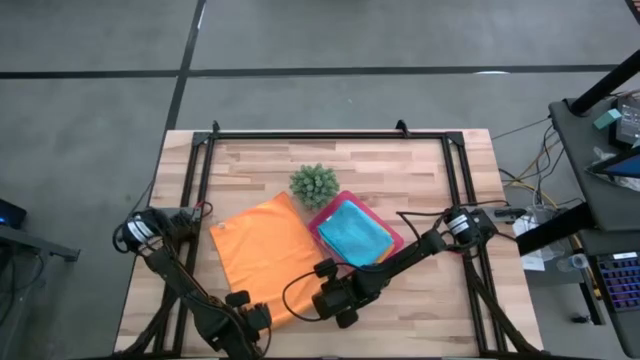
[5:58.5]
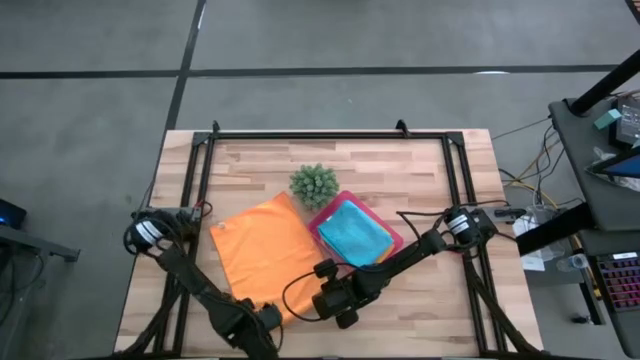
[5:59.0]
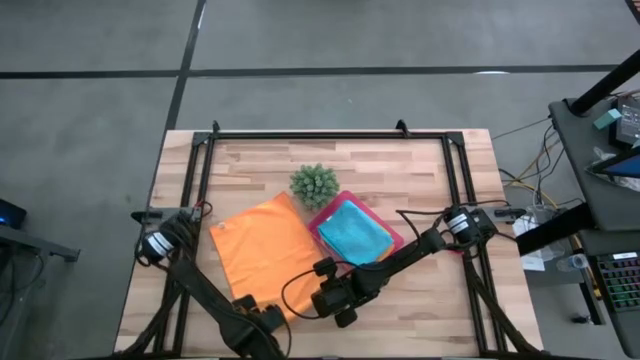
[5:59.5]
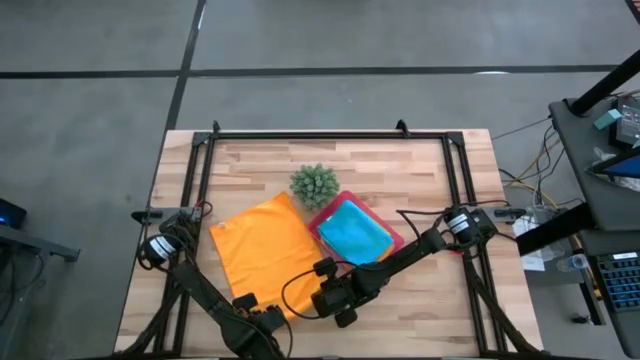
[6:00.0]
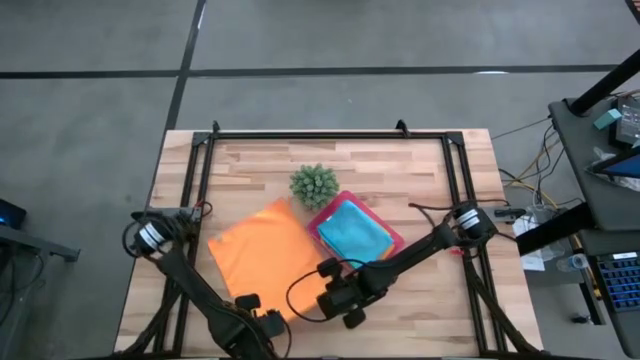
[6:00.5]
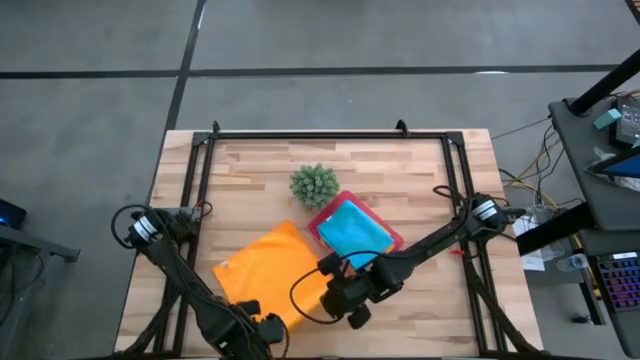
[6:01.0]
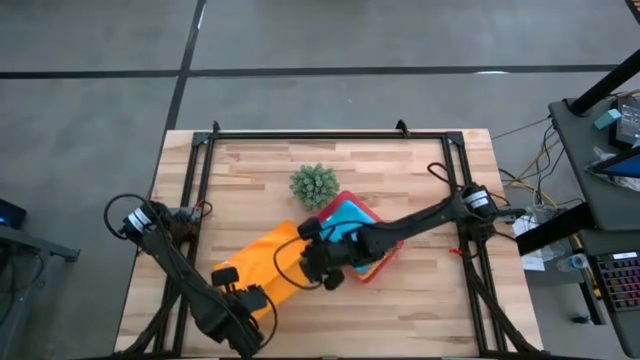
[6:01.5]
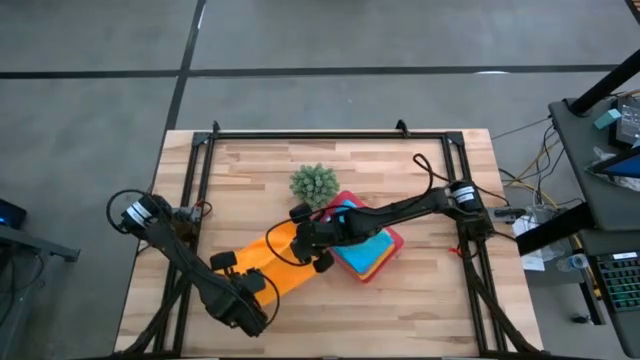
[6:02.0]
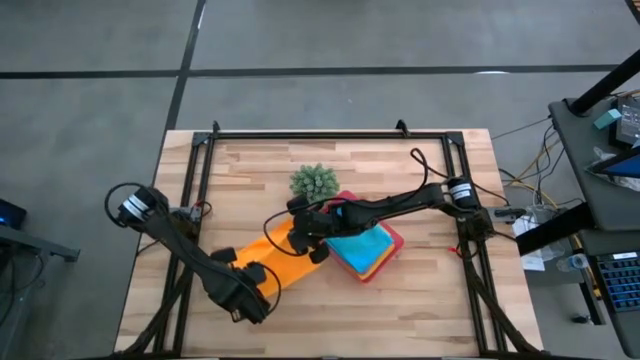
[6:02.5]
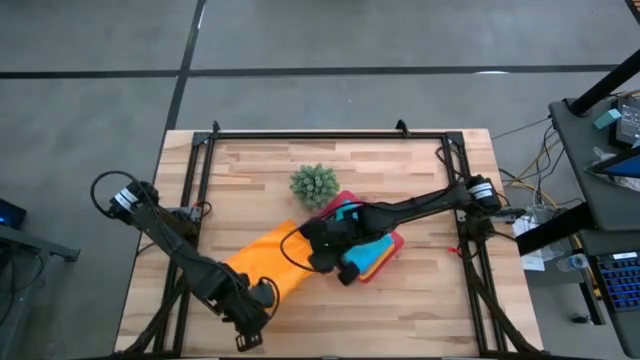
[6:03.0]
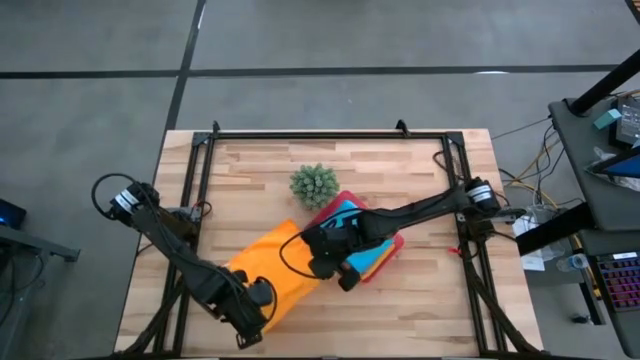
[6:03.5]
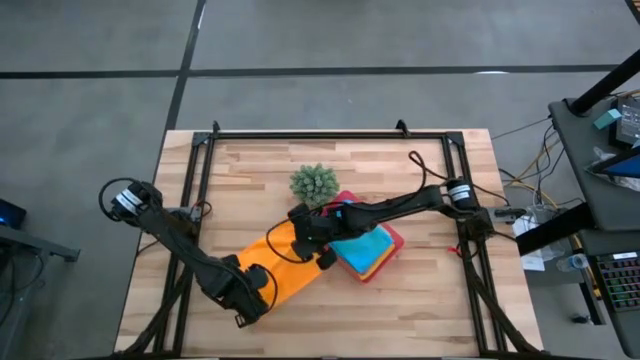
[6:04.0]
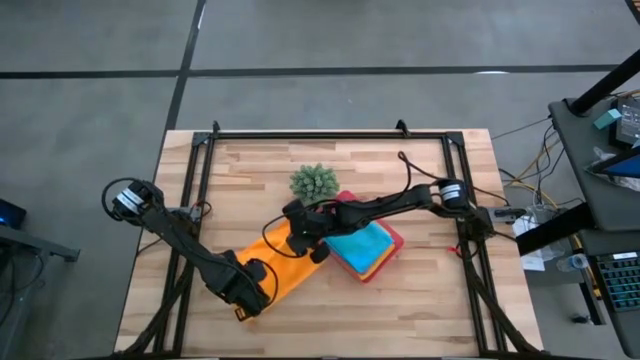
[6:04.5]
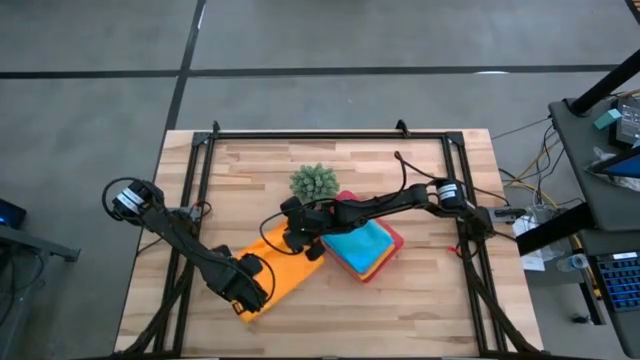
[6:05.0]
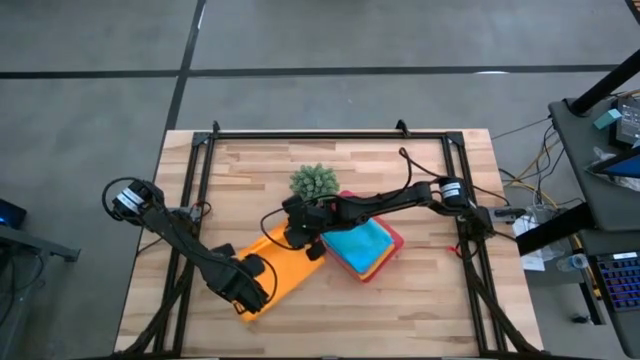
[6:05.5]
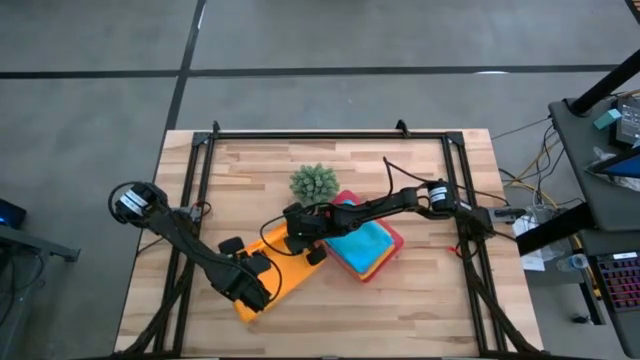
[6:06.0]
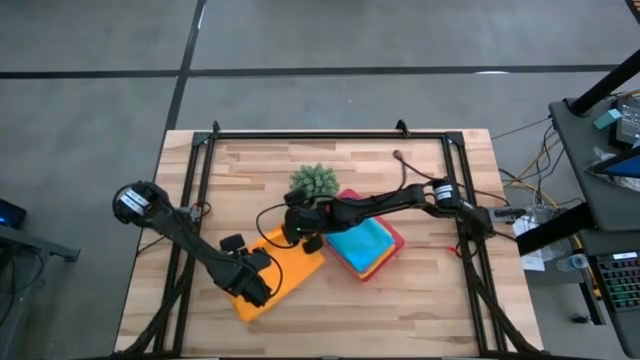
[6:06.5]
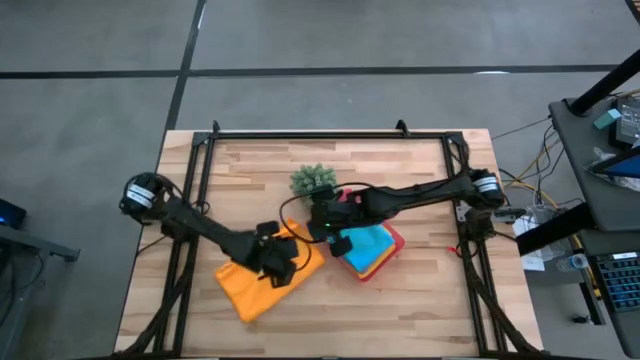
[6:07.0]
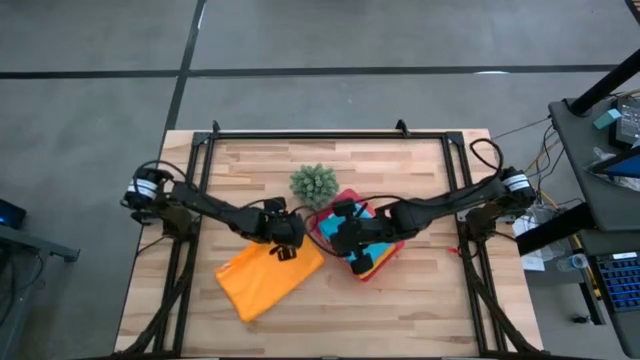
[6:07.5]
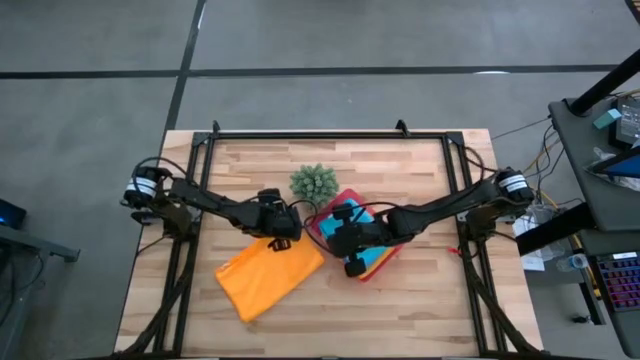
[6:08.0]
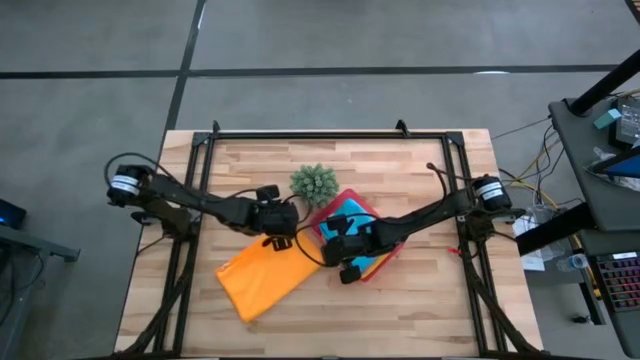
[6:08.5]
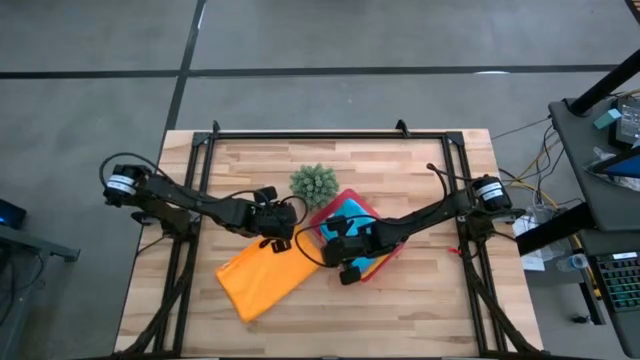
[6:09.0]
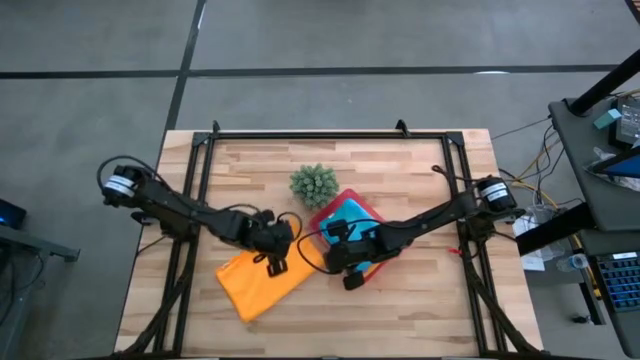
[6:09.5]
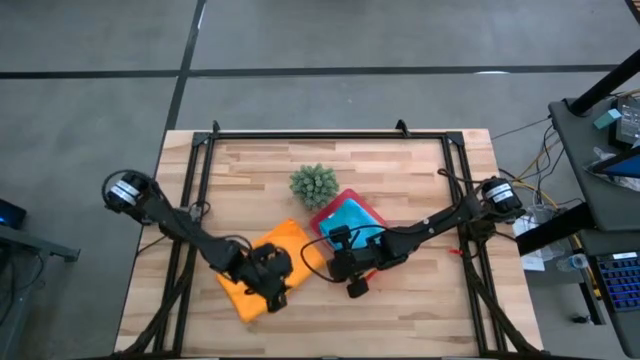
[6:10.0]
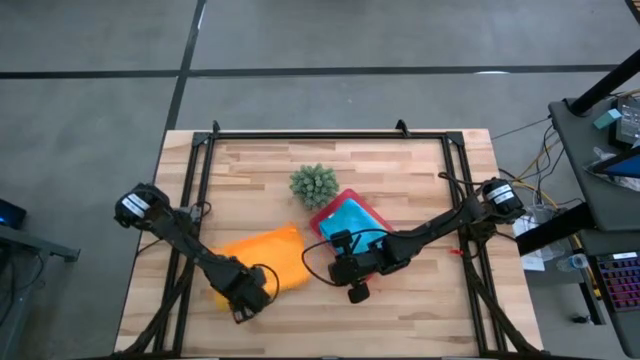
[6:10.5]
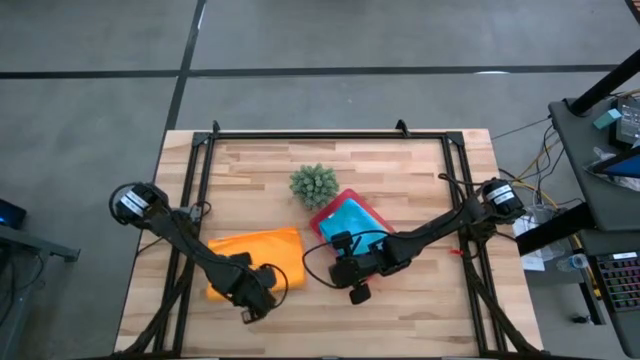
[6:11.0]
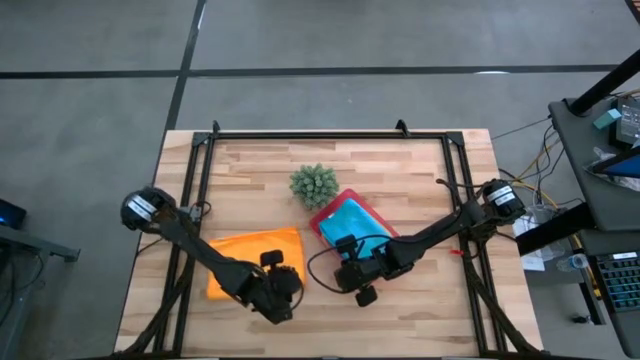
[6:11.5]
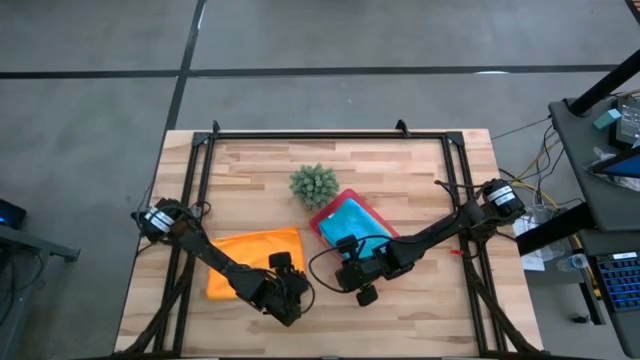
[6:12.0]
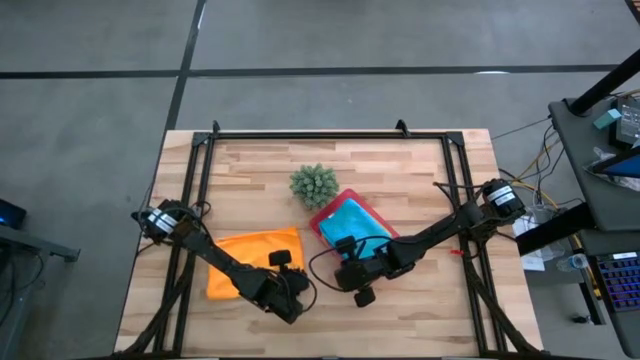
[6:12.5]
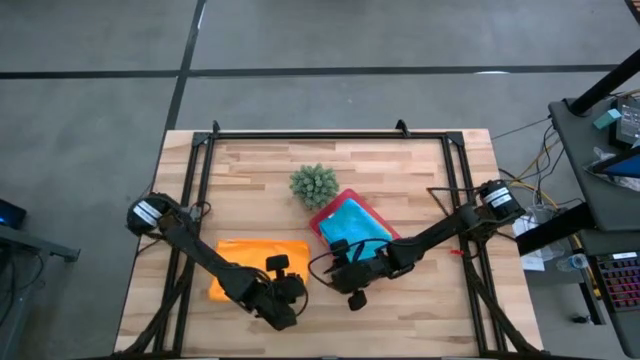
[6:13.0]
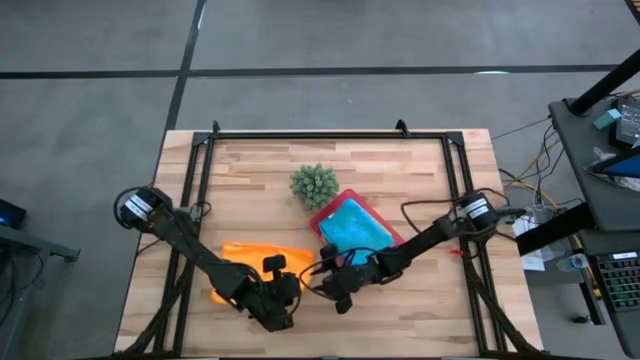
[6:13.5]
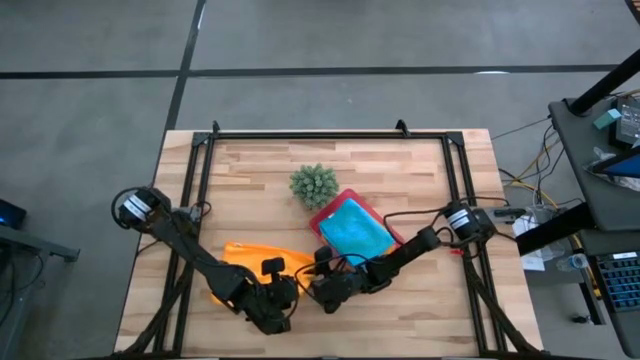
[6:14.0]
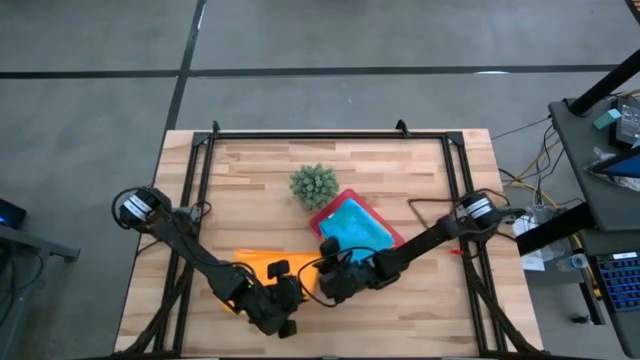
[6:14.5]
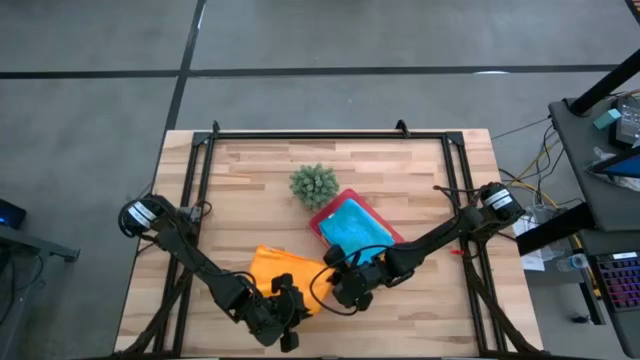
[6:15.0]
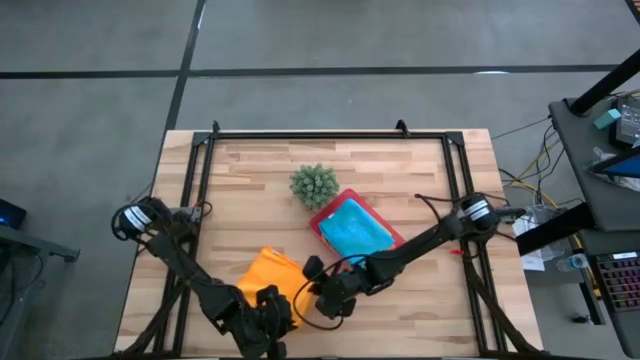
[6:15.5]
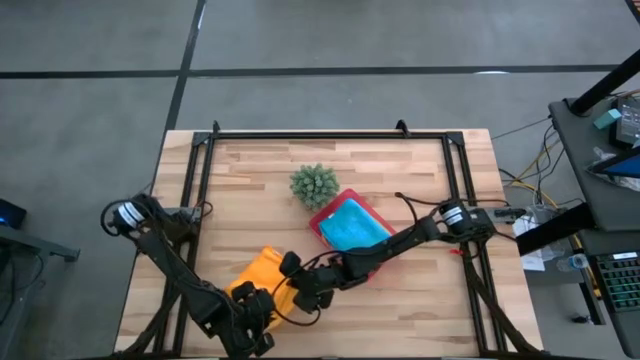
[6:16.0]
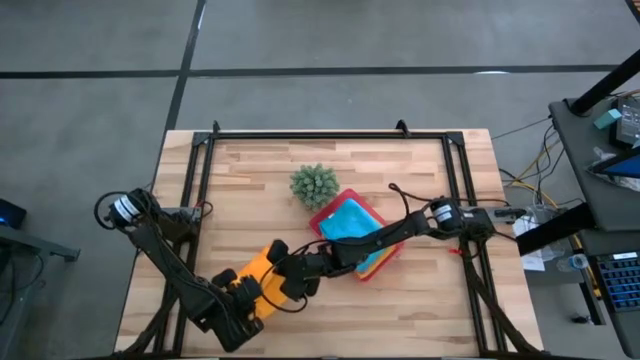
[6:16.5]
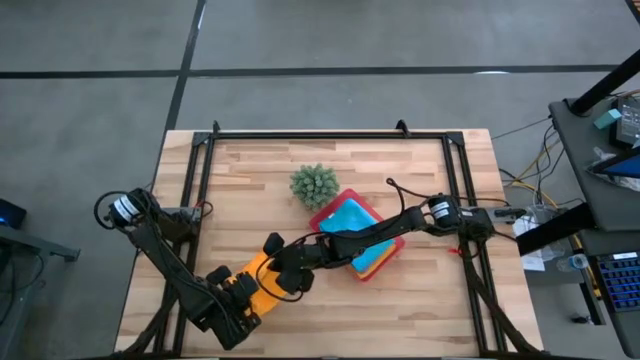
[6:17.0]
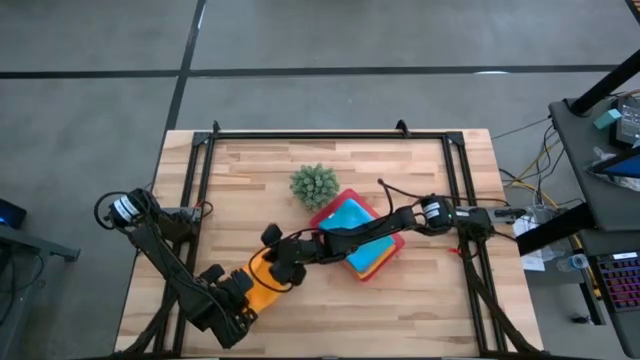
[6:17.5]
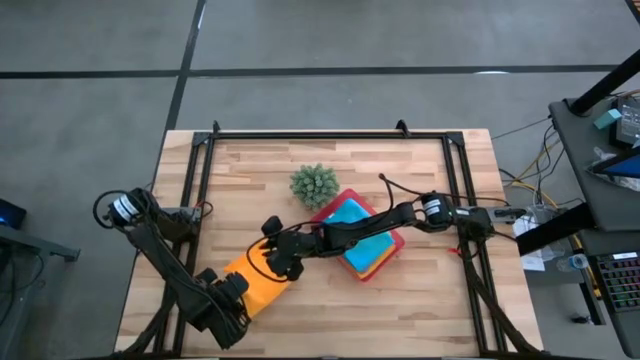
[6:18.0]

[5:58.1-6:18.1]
Task: Fold microfiber towels
Fold the orange microfiber cloth
